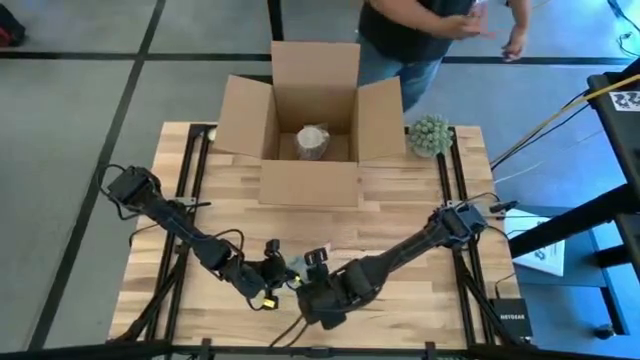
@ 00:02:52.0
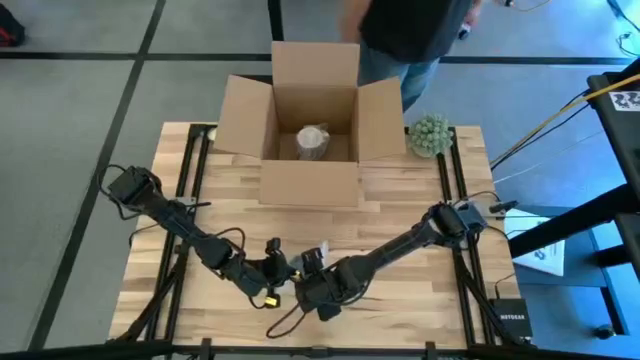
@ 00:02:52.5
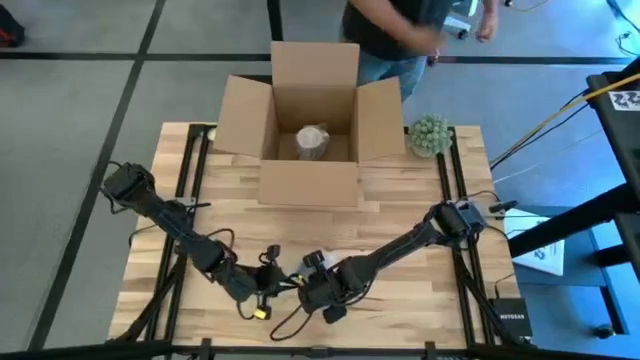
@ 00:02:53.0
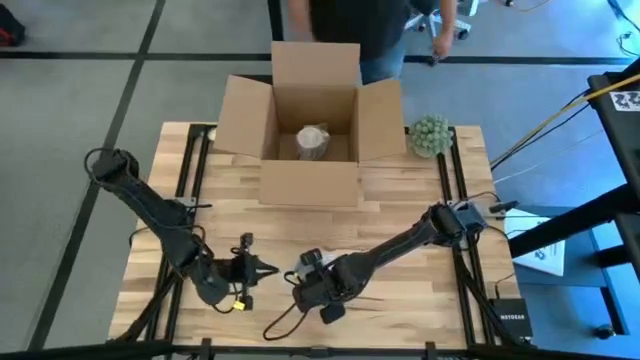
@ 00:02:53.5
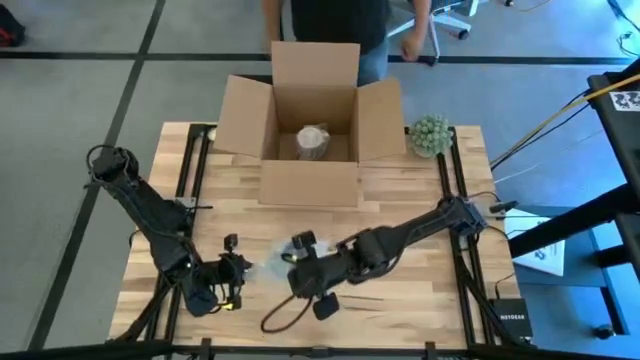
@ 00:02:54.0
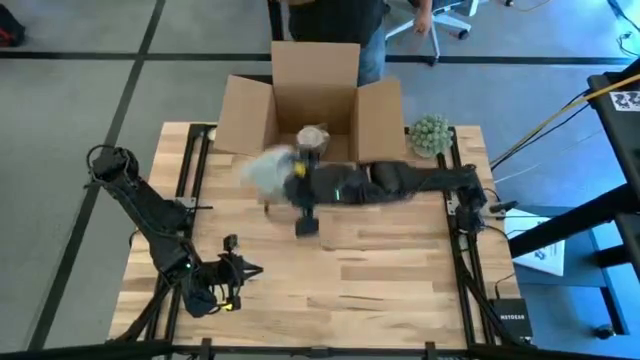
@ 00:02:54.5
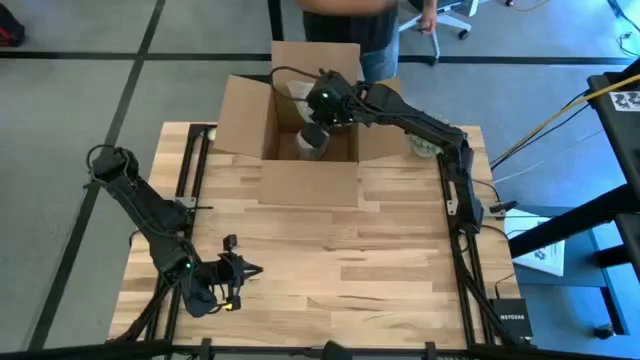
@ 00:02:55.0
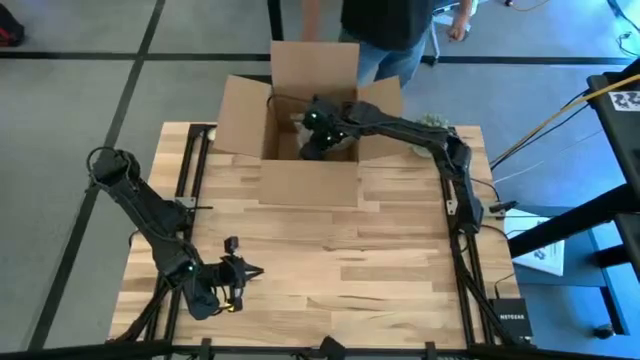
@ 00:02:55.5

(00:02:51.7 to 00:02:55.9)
Task: wrap mug
Put the wrapped dark green mug inside the box

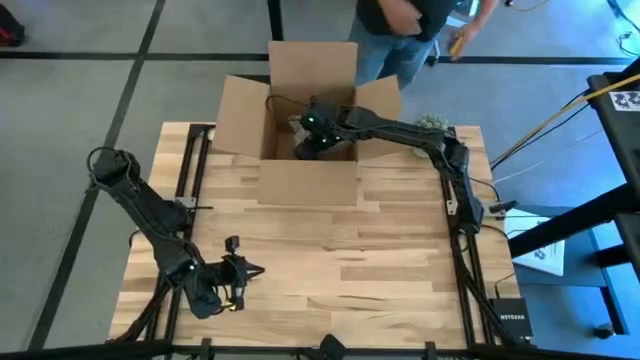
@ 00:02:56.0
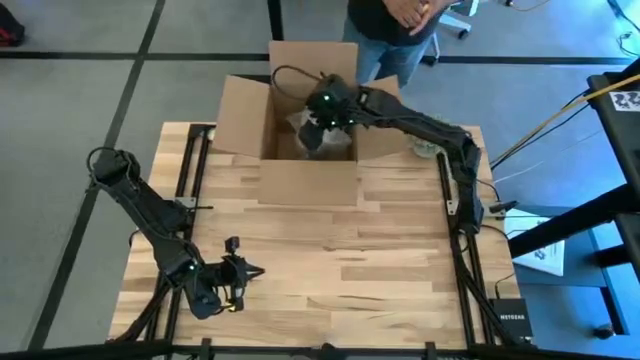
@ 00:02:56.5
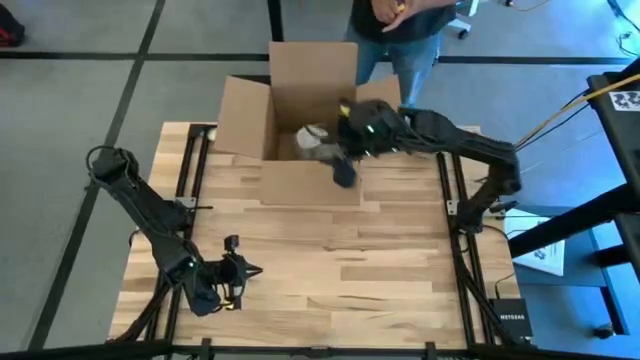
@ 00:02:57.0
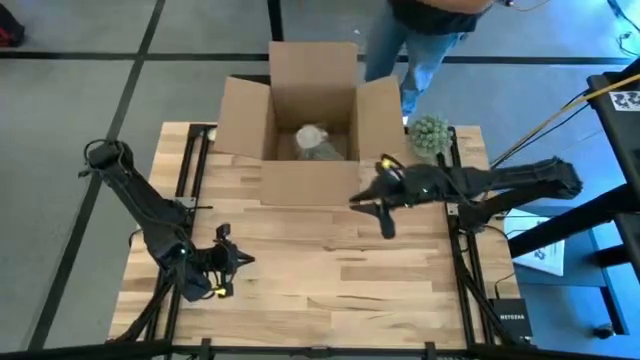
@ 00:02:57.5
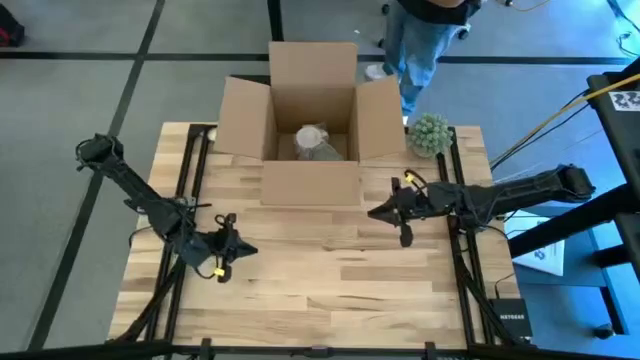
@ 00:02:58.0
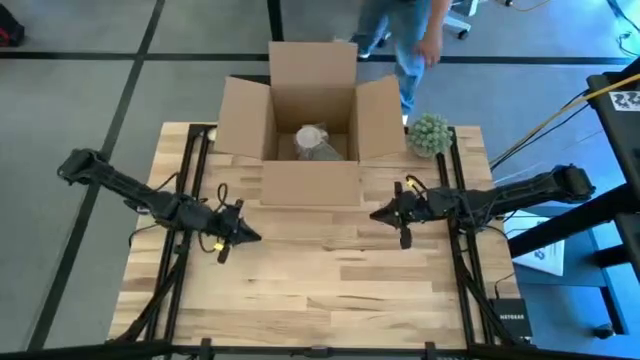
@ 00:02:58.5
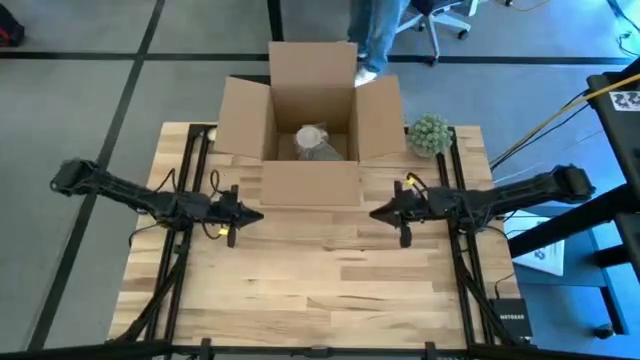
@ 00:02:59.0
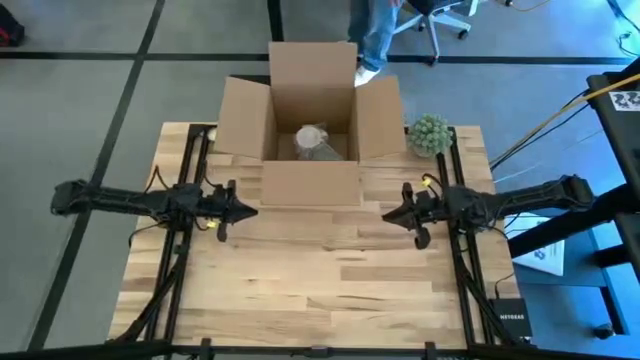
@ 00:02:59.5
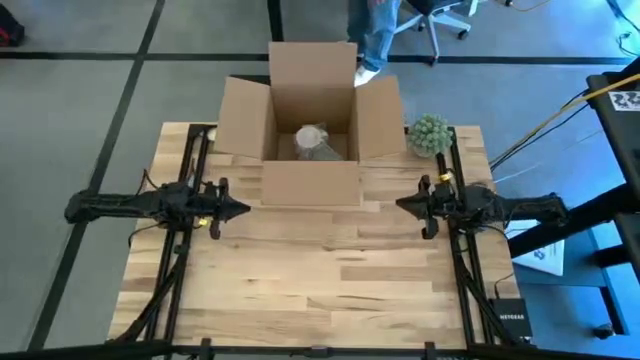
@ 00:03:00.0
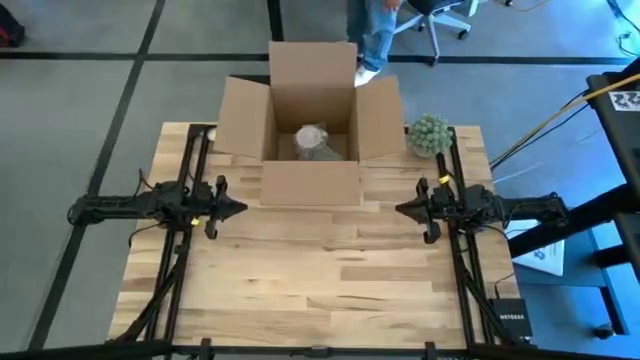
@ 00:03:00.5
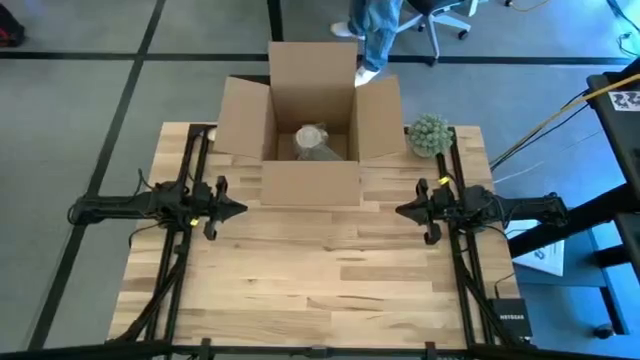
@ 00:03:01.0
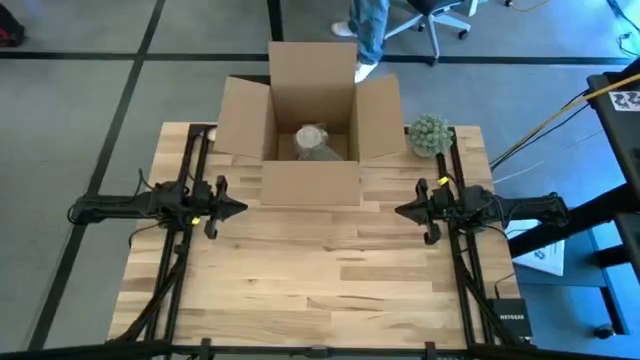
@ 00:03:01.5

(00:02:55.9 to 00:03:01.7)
Return to Home Position

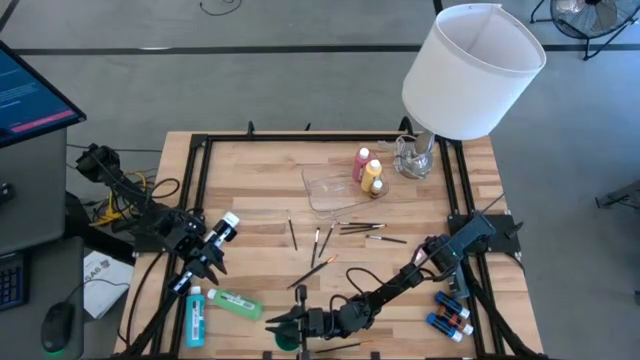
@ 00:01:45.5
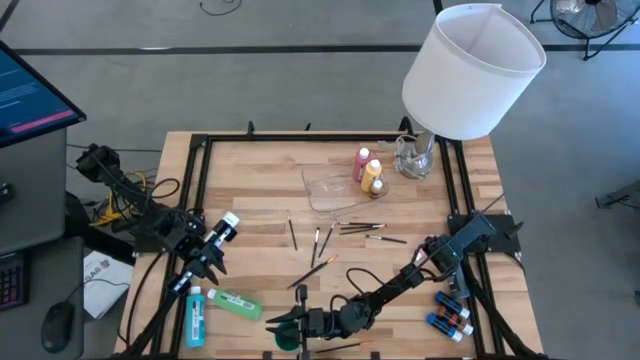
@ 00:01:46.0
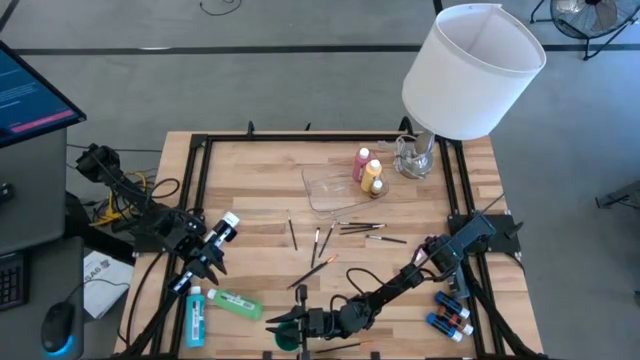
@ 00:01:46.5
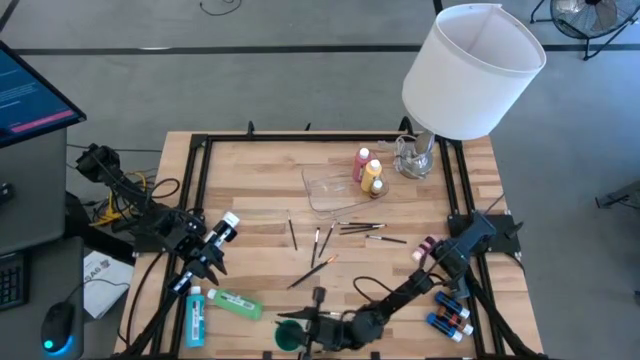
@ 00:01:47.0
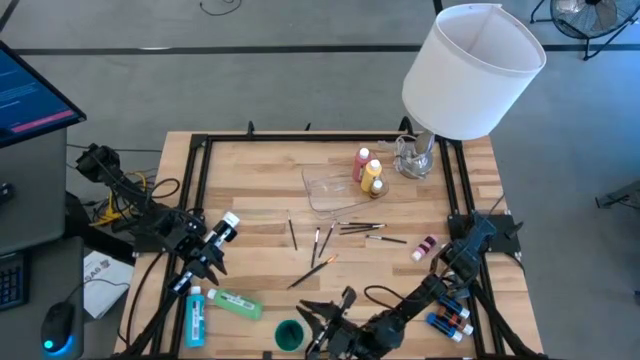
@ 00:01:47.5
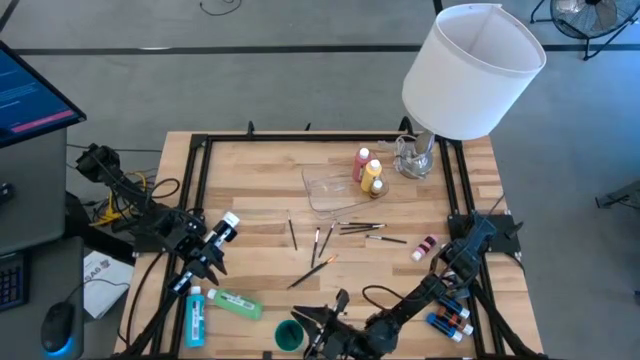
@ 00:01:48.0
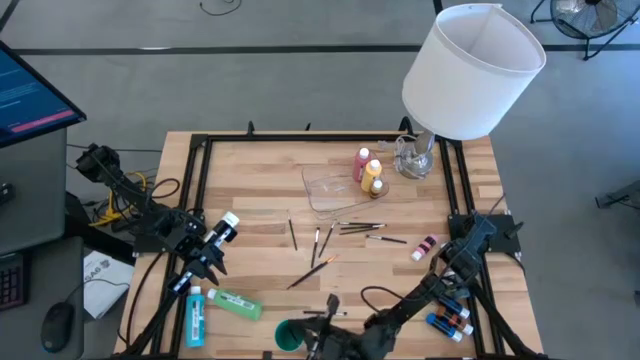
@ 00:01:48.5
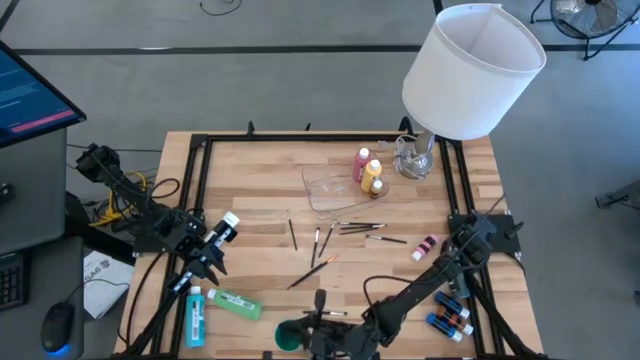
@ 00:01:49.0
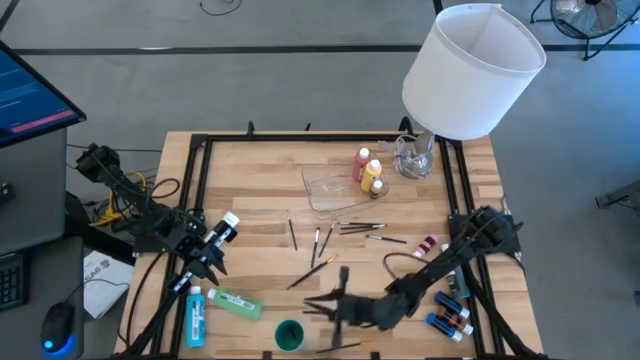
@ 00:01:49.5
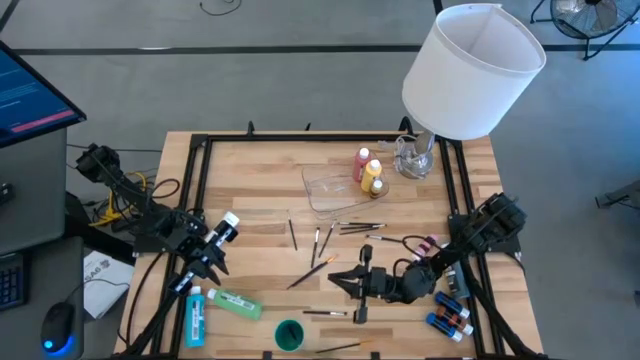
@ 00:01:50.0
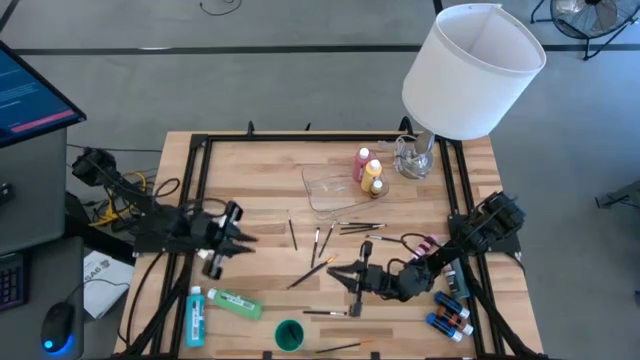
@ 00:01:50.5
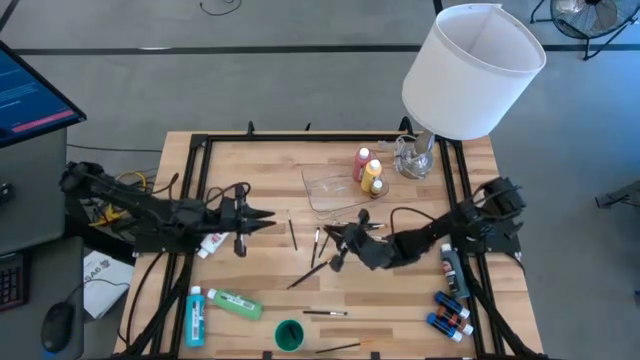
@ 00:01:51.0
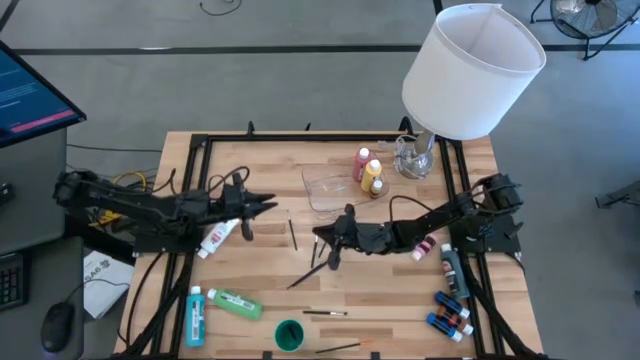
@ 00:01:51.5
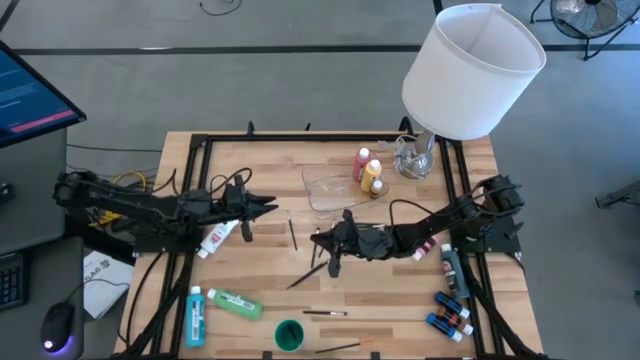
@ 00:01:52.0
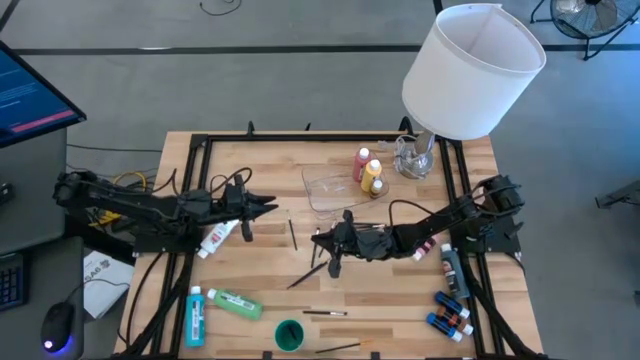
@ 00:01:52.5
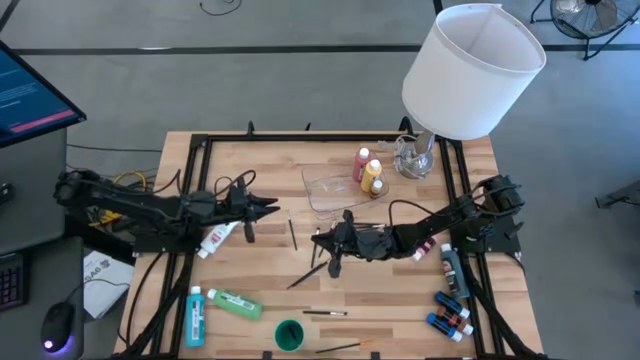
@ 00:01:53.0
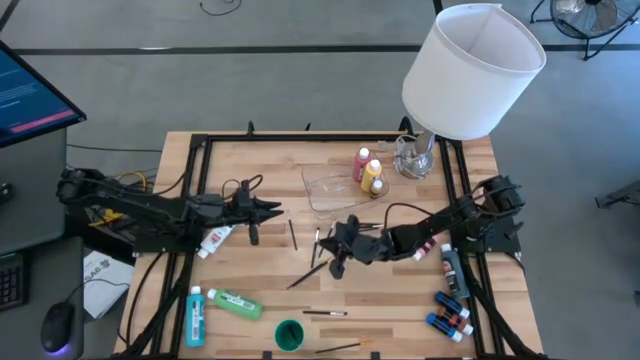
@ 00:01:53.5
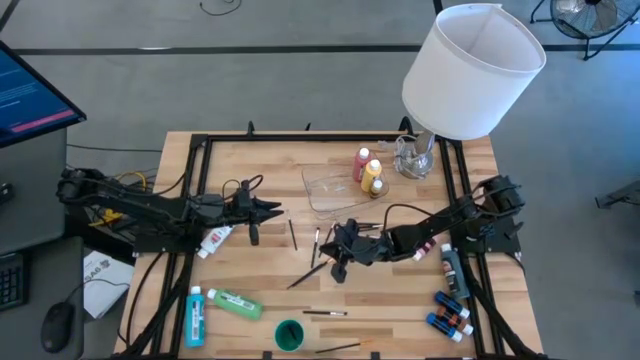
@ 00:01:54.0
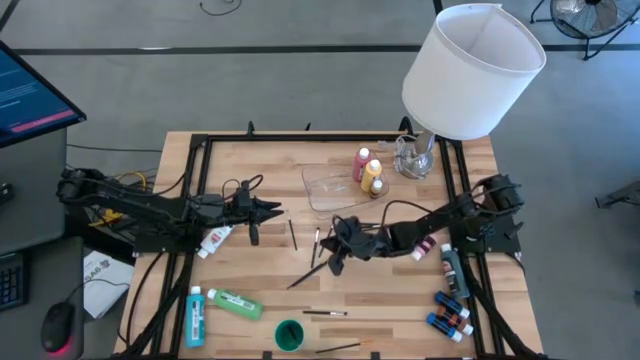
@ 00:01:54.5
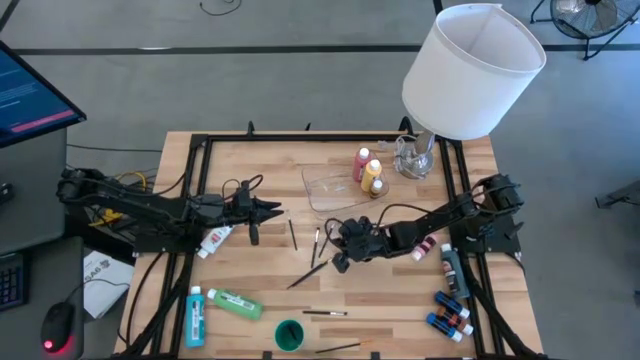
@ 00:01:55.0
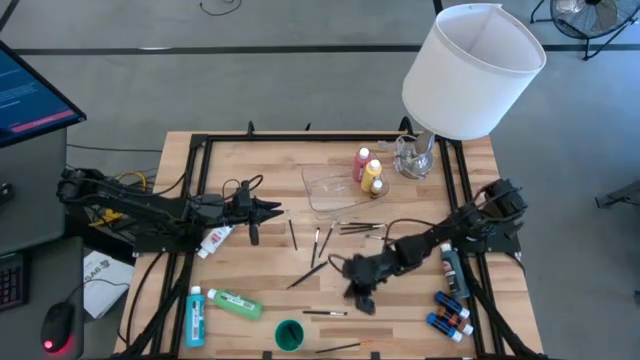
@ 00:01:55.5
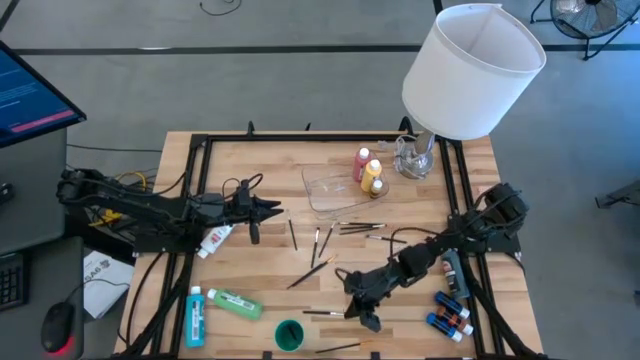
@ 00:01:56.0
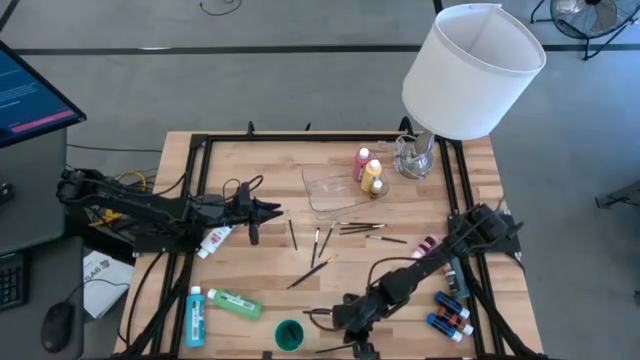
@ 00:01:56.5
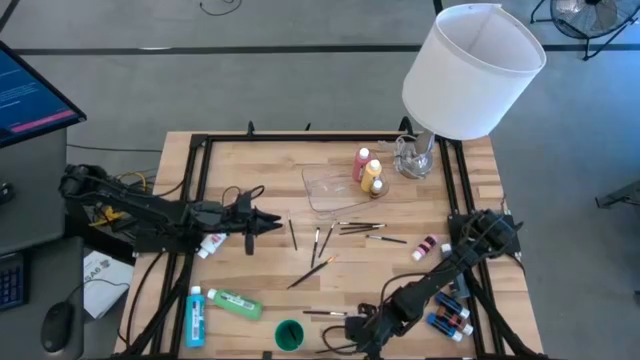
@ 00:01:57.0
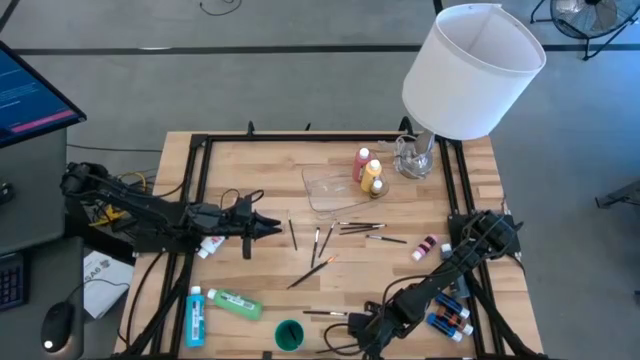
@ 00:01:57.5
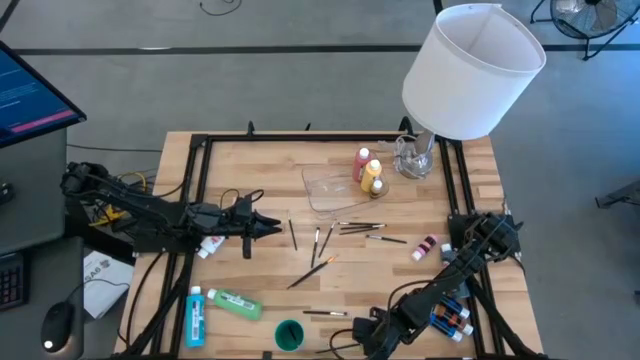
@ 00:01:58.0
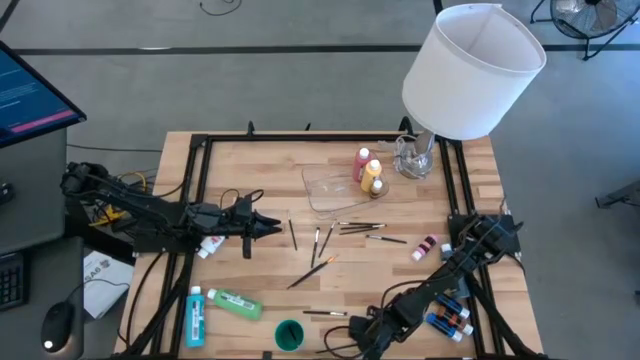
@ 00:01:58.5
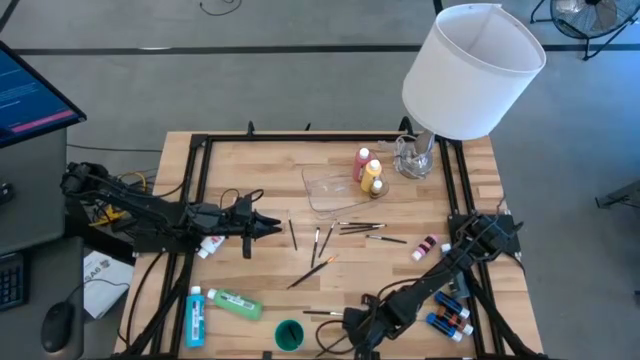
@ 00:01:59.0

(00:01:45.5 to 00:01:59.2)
Task: Pick & Place Paint Supplies
Adjust the gold paintbrush on the table
